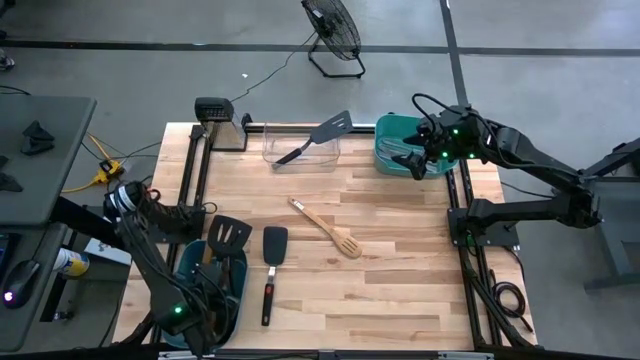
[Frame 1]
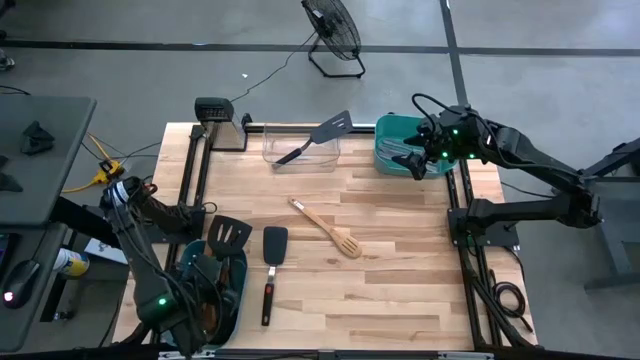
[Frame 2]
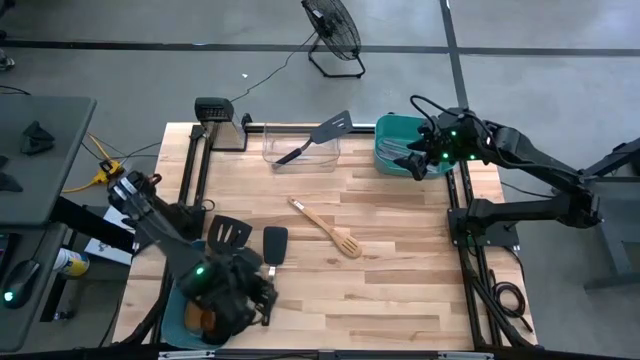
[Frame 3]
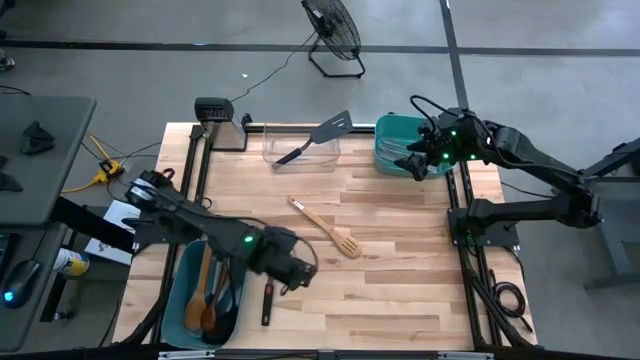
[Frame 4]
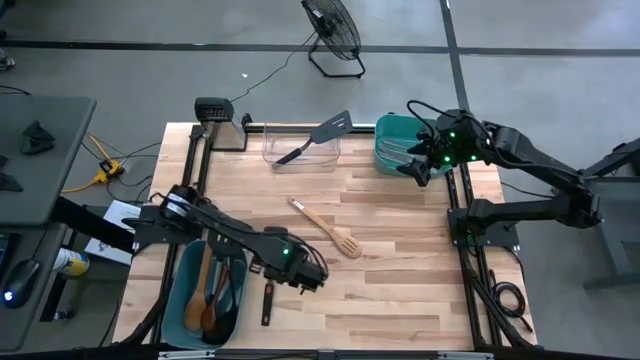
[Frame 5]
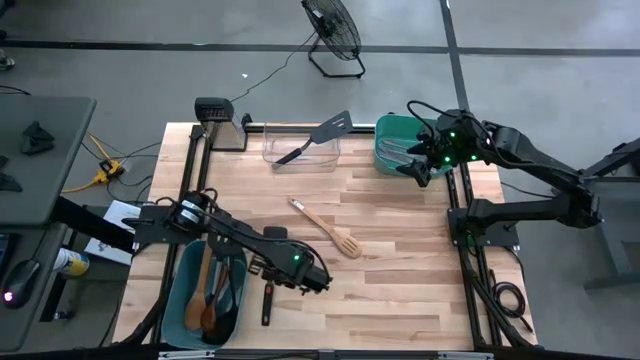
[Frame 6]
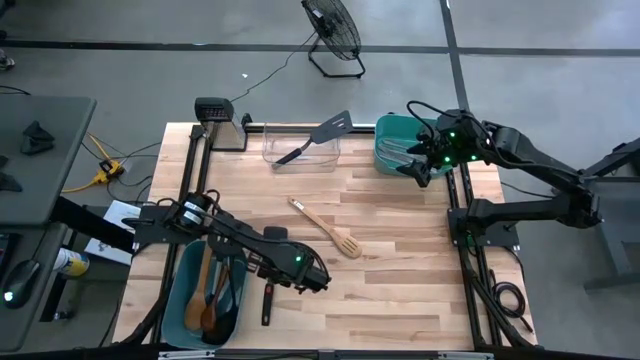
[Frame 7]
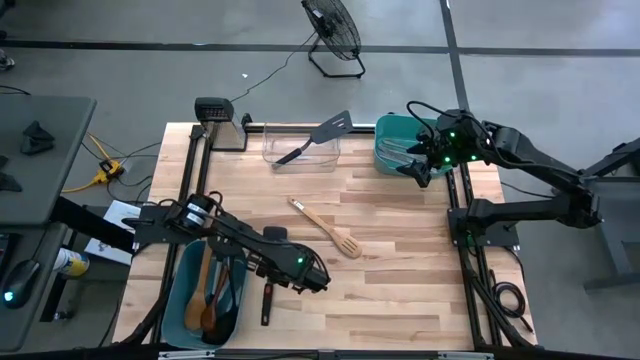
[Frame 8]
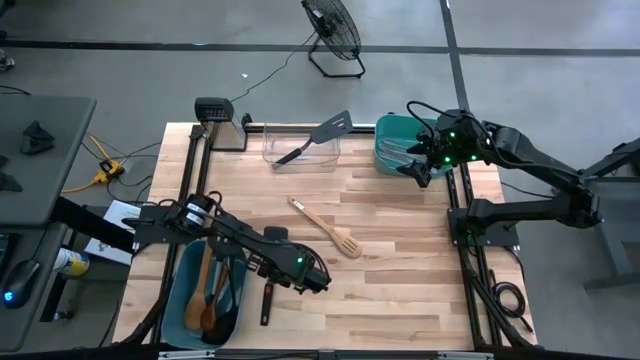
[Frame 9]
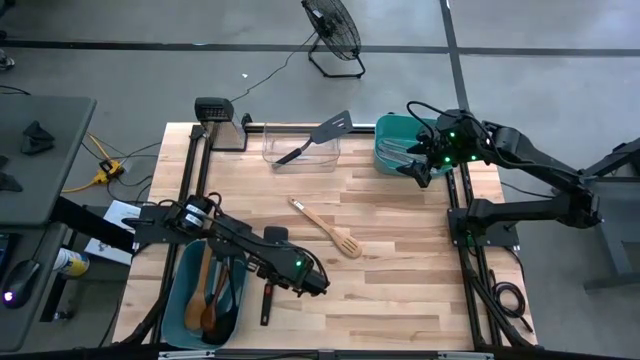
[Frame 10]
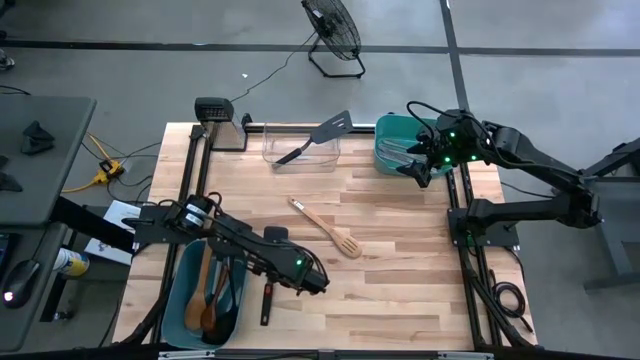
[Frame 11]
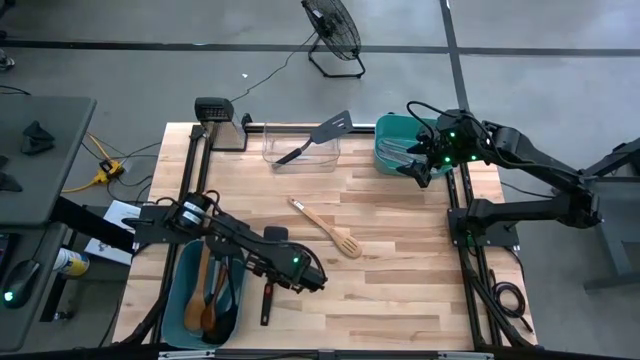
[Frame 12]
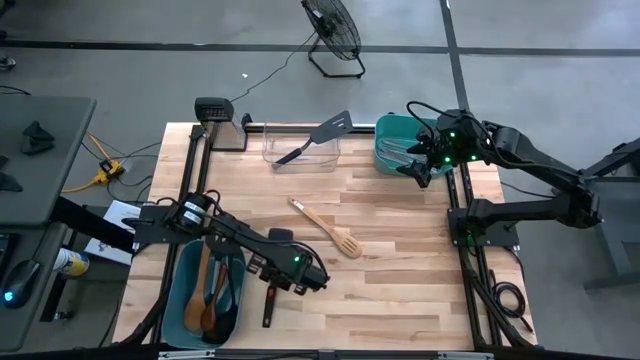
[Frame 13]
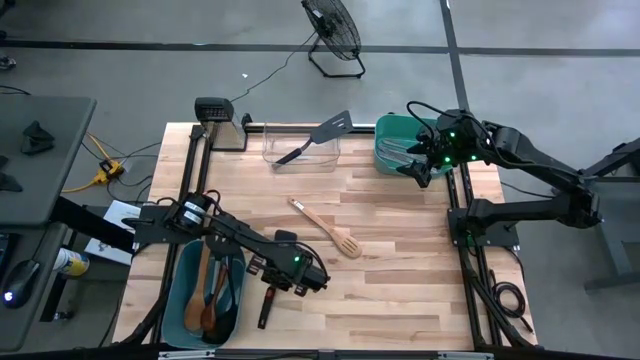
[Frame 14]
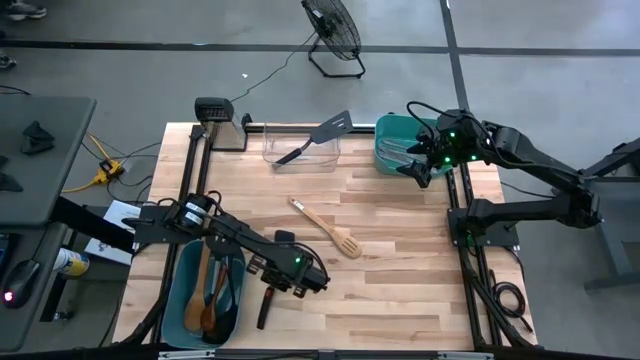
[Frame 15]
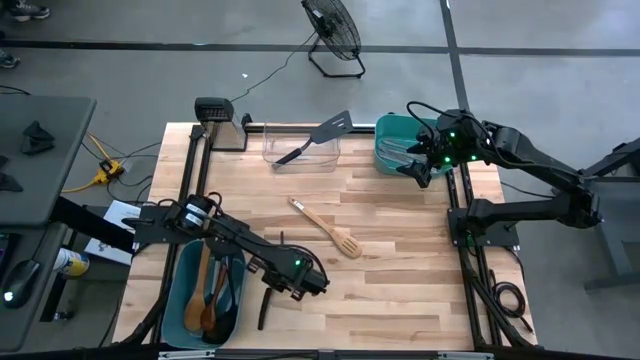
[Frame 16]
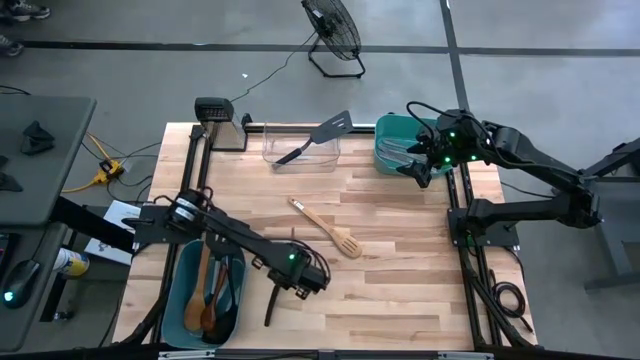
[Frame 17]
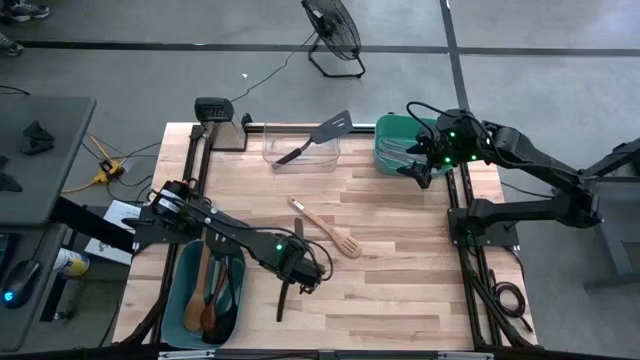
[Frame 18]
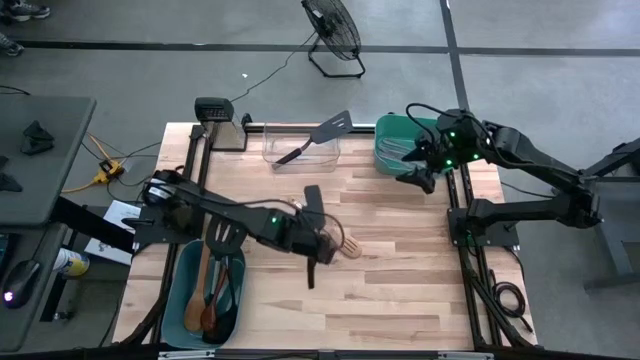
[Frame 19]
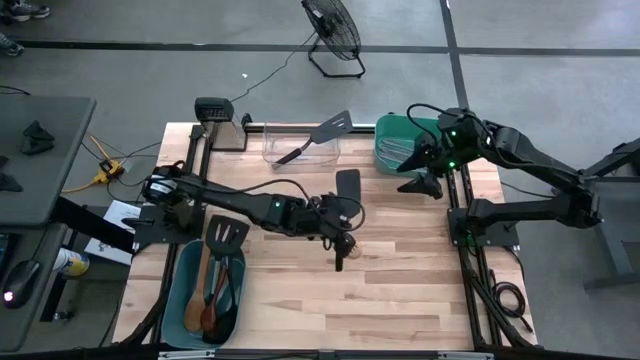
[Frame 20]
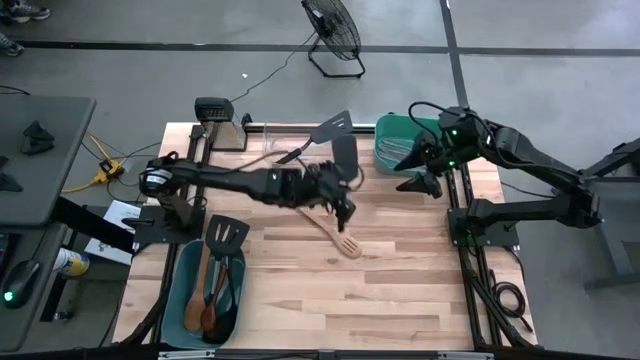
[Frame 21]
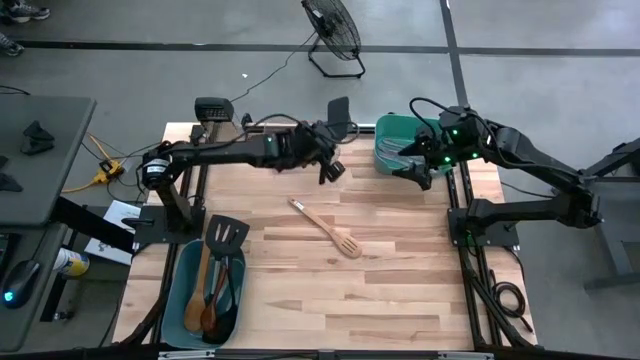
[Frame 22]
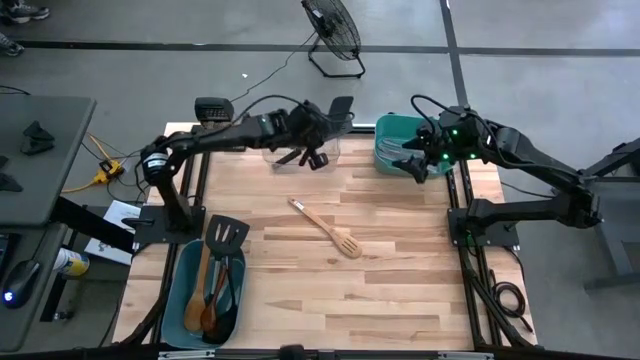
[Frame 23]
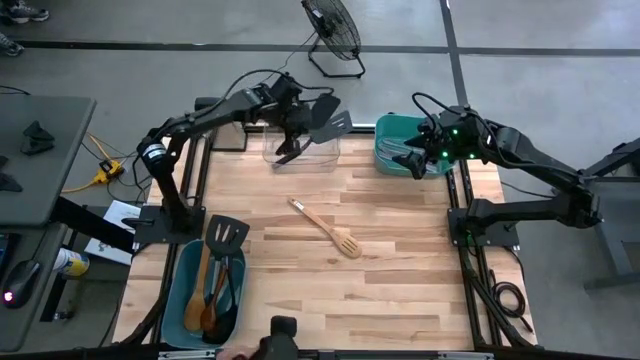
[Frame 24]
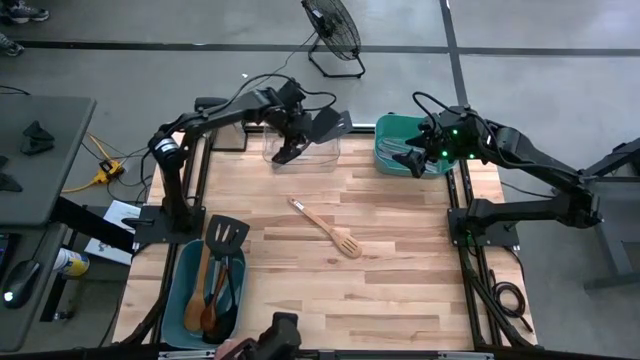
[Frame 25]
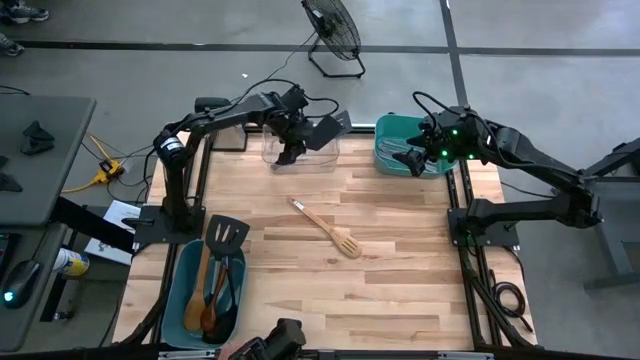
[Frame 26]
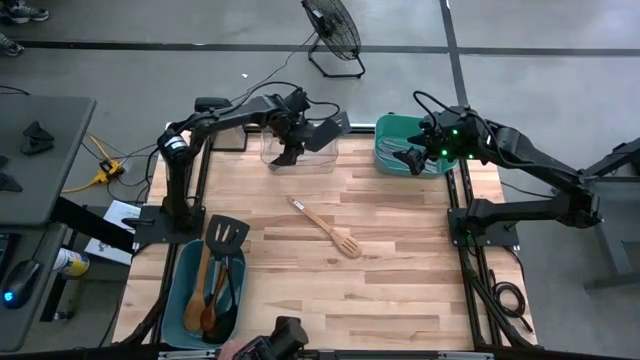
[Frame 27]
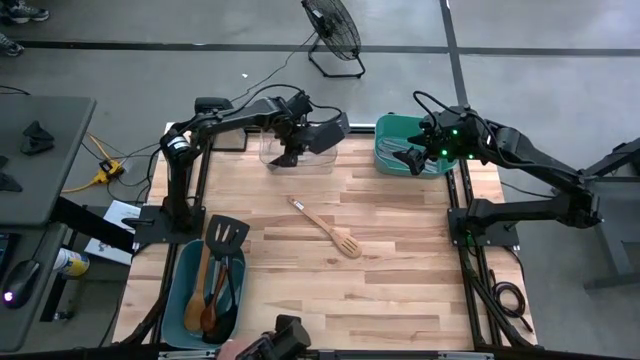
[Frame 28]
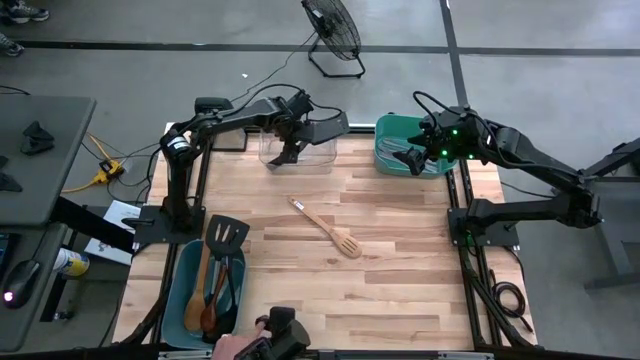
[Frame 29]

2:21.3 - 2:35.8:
Task: Pick & Place Kitchen Items
Put the spatula into the transparent bin

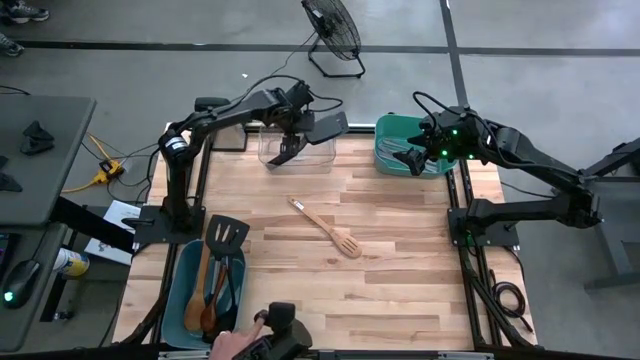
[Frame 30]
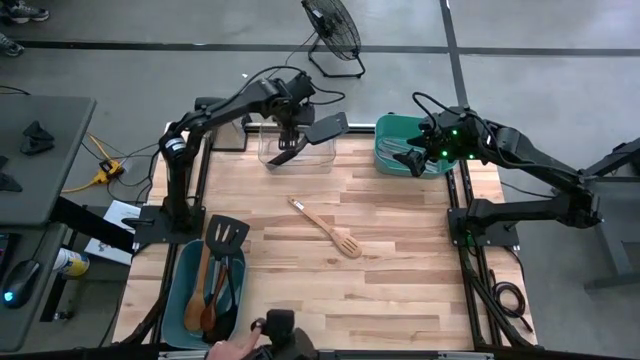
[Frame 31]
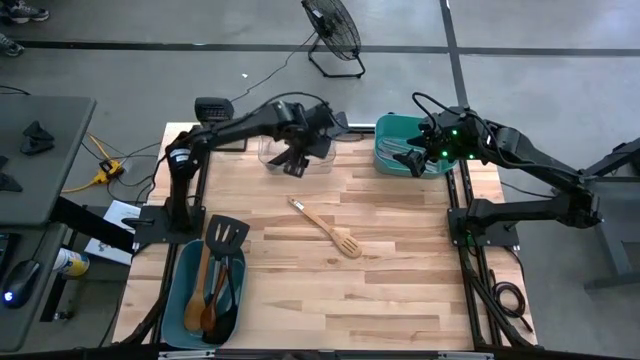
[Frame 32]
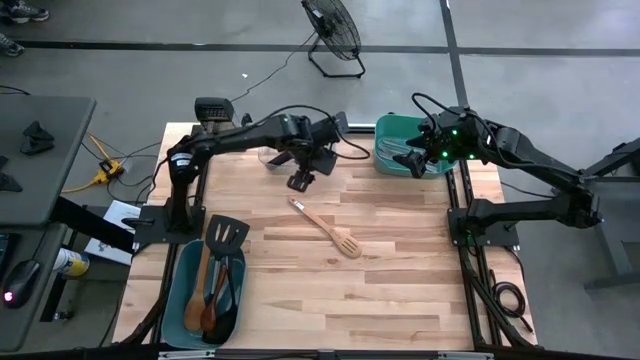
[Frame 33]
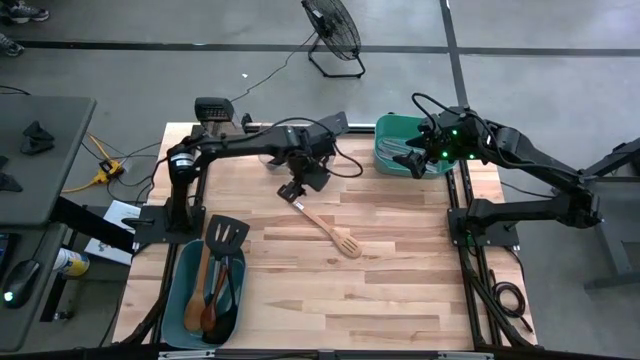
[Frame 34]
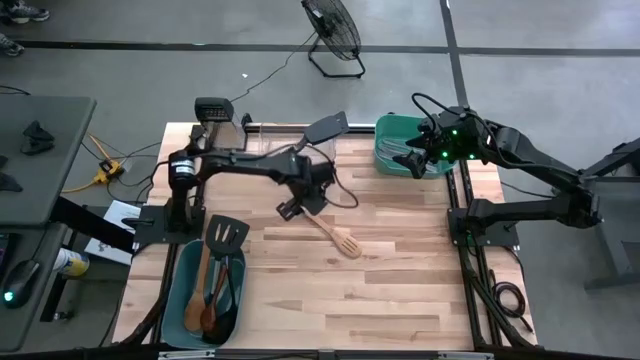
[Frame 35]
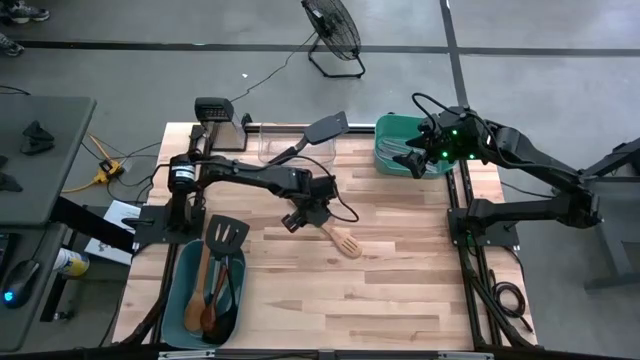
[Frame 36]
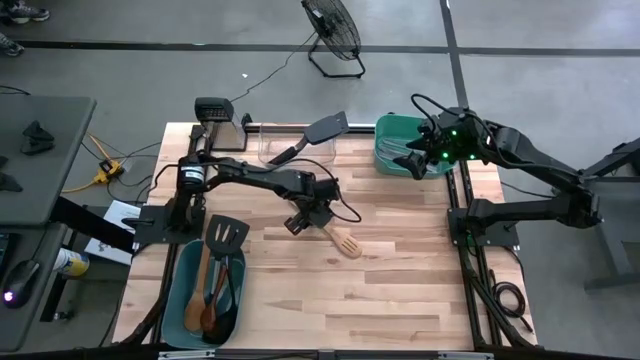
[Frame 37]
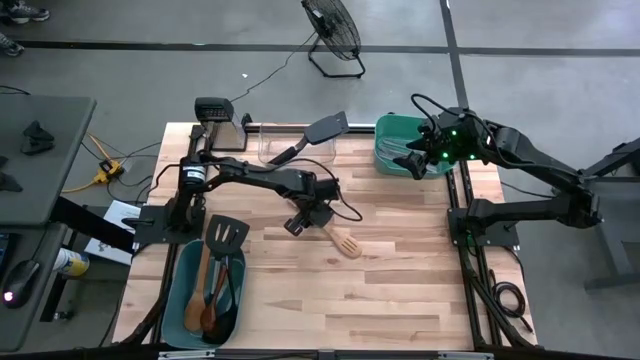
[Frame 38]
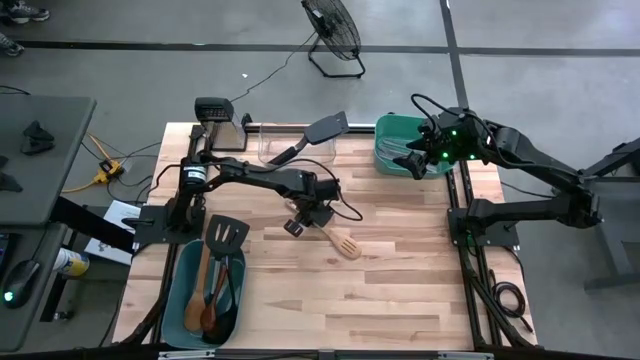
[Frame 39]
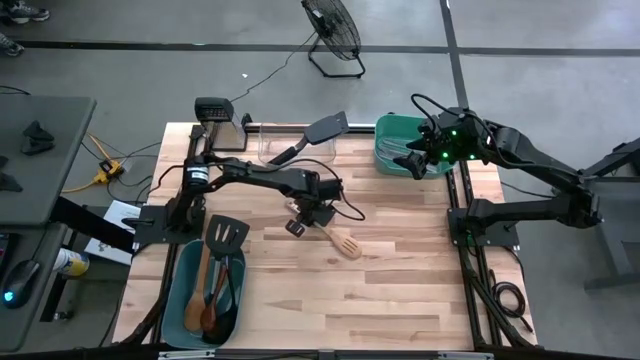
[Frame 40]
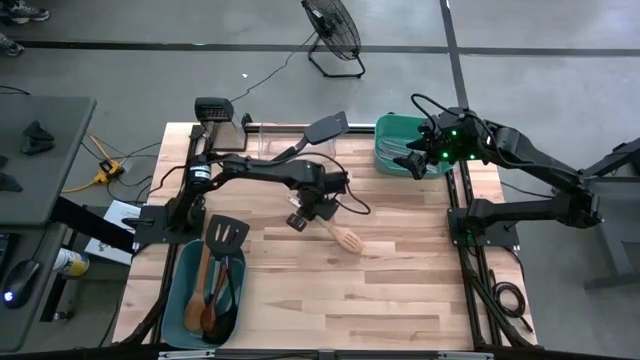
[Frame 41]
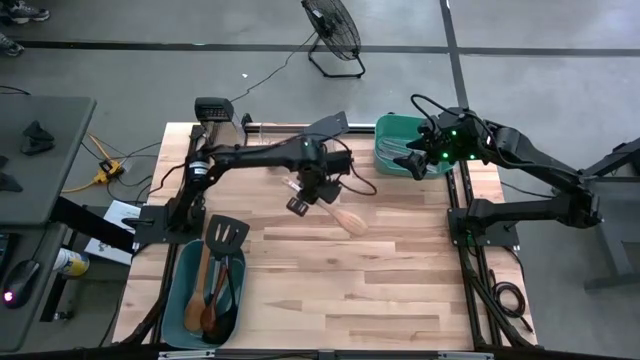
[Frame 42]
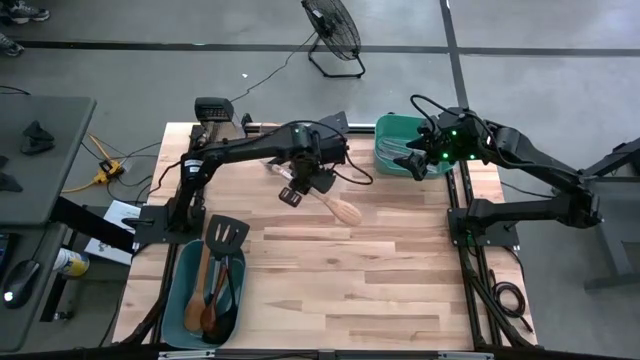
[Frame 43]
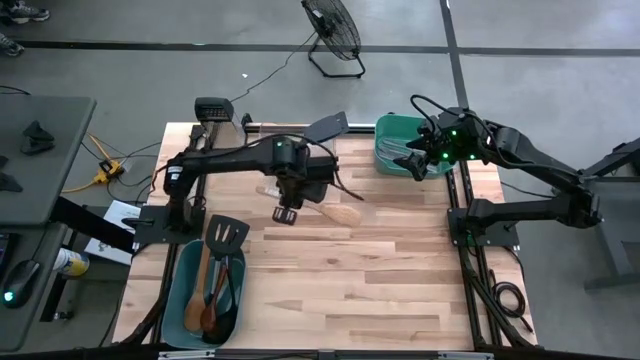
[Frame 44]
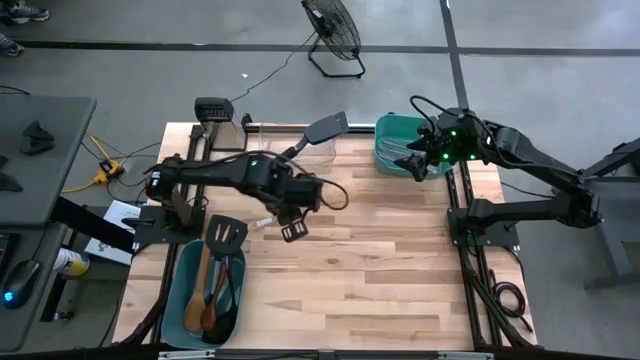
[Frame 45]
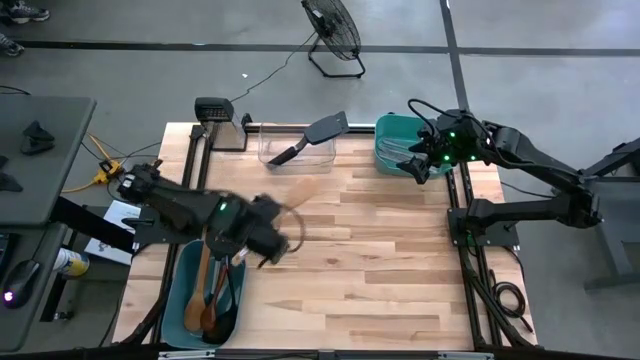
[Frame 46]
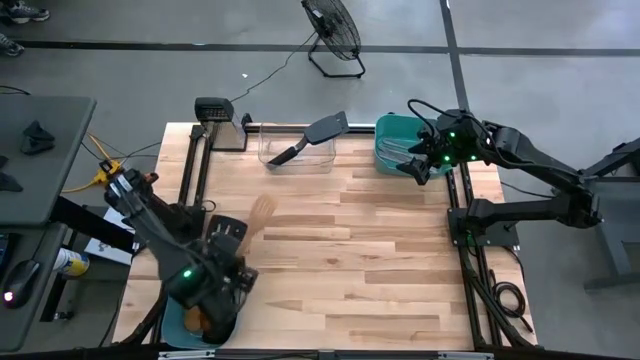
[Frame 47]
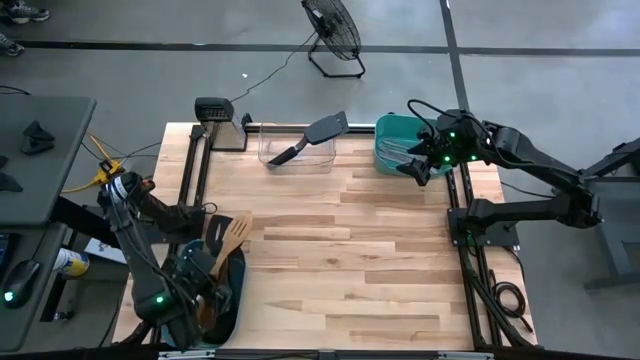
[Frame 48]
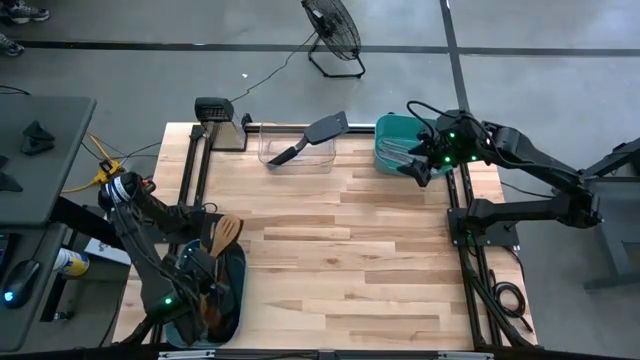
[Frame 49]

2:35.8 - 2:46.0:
Put the wooden spatula into the blue bin
